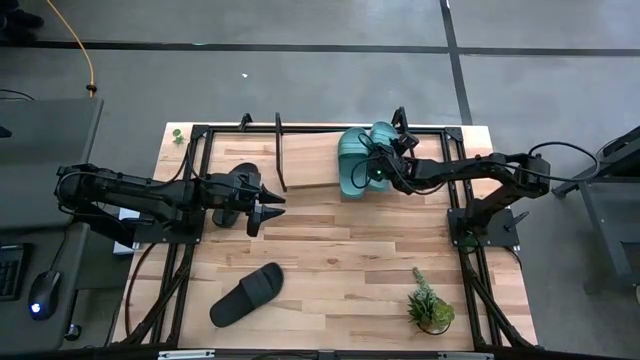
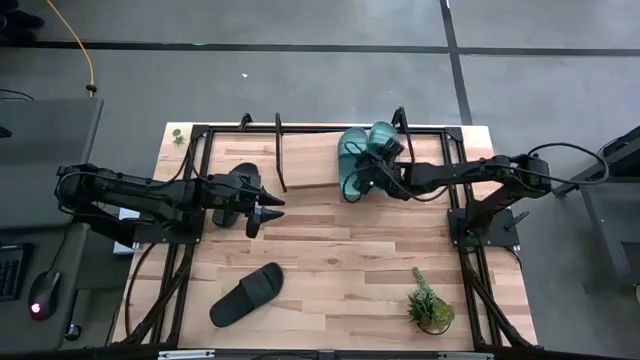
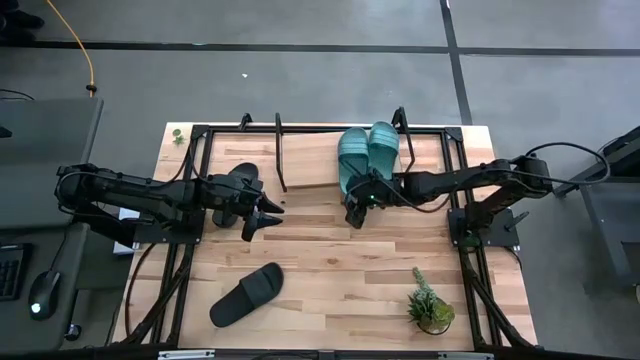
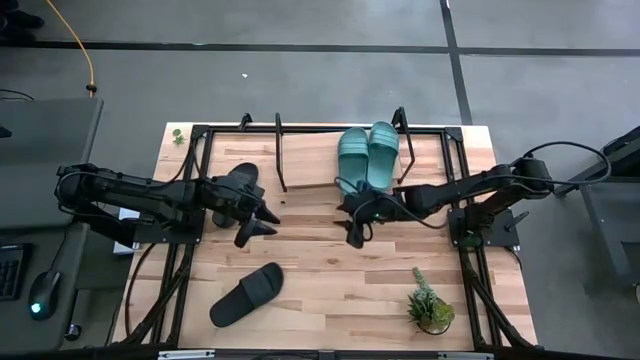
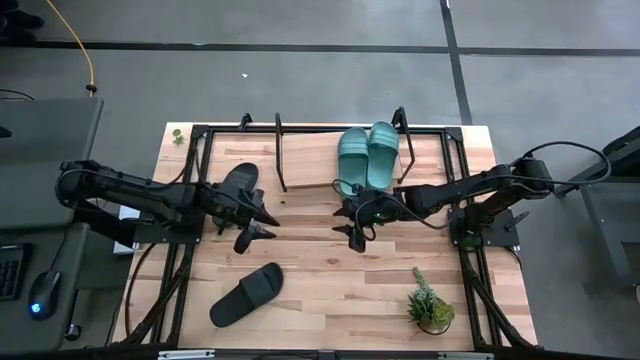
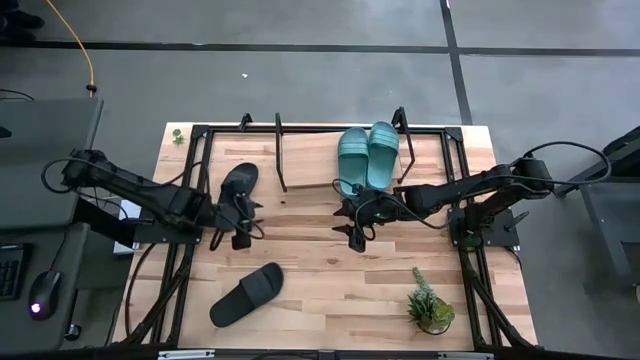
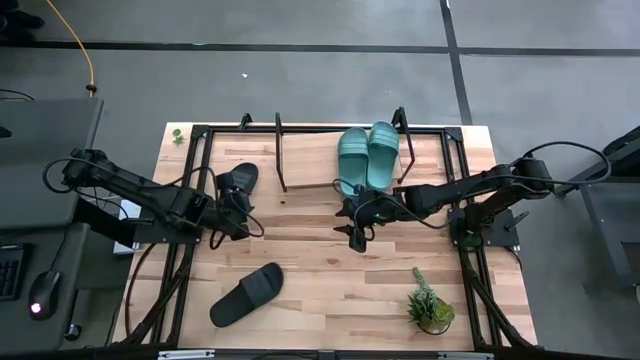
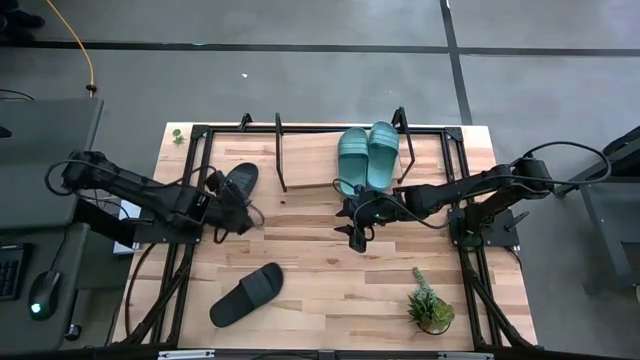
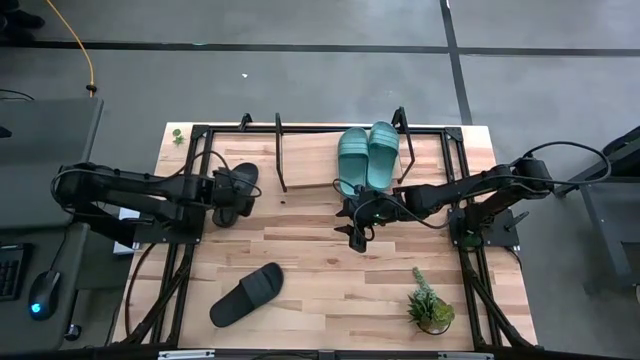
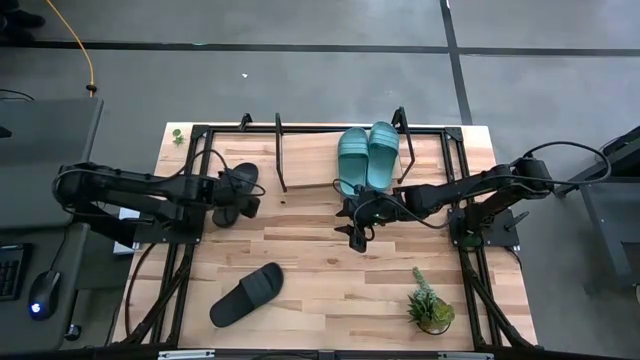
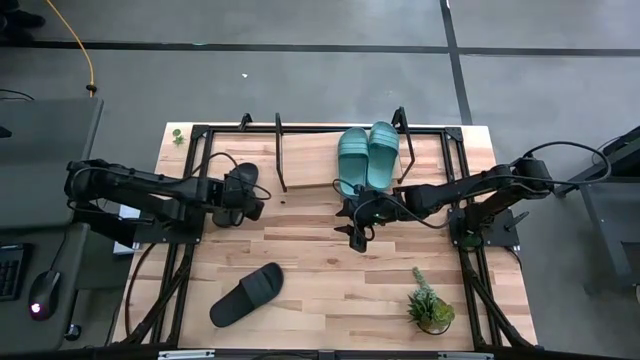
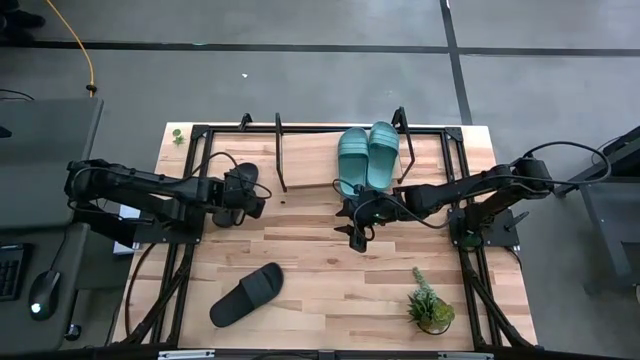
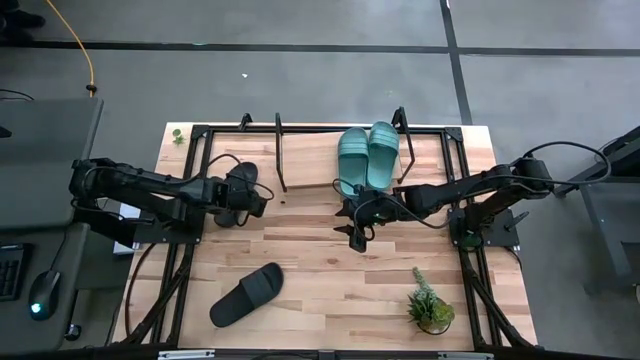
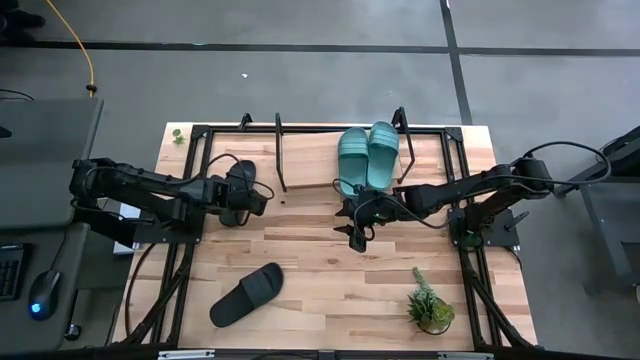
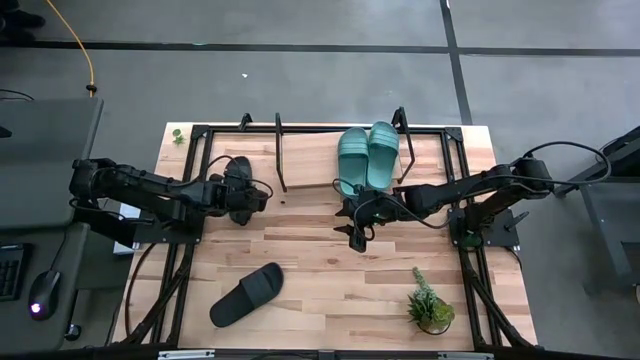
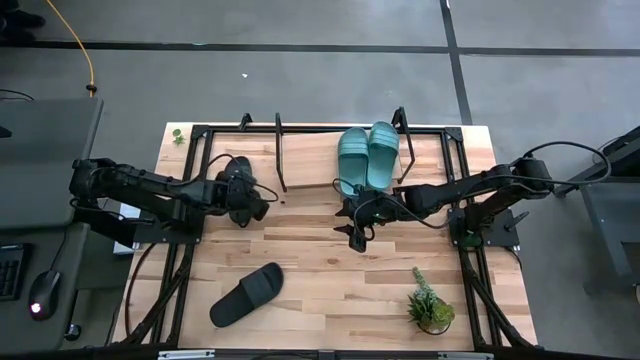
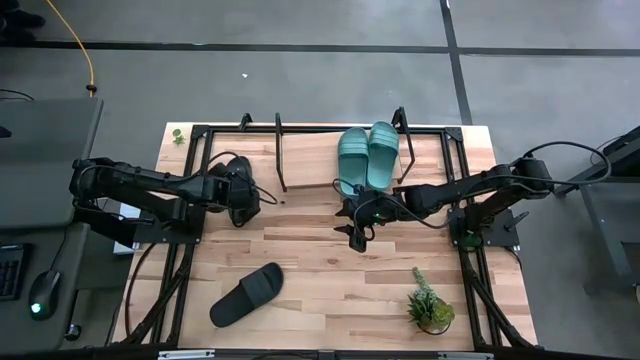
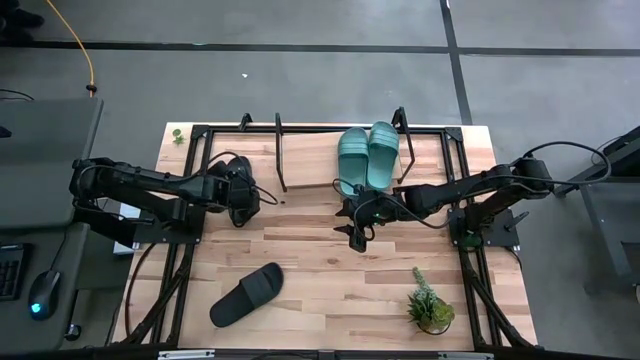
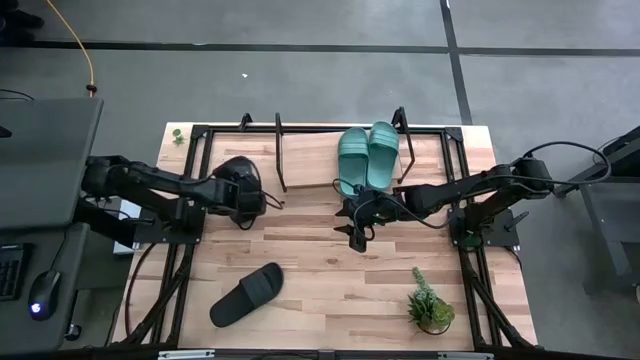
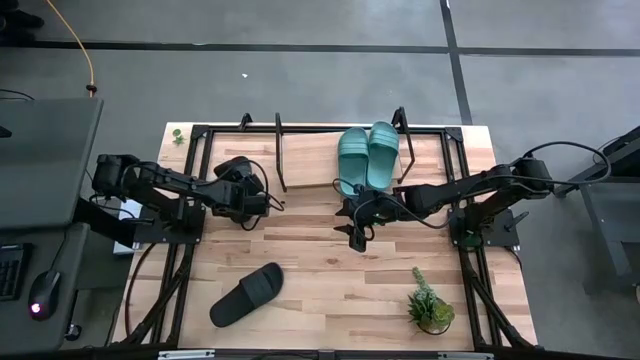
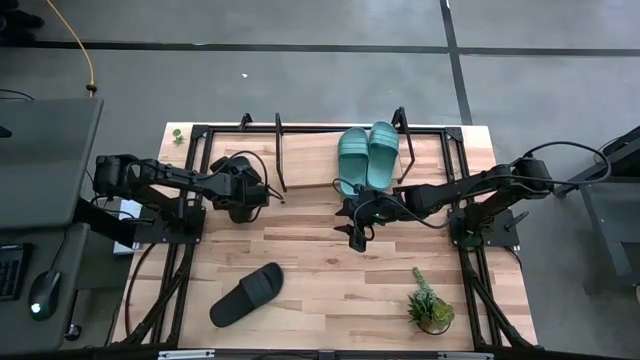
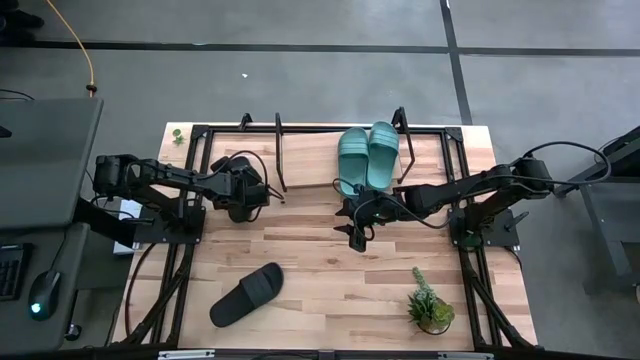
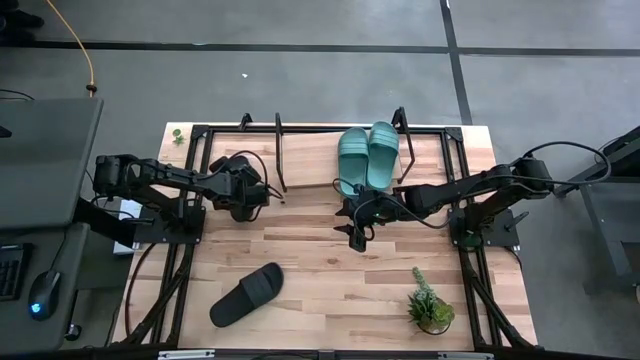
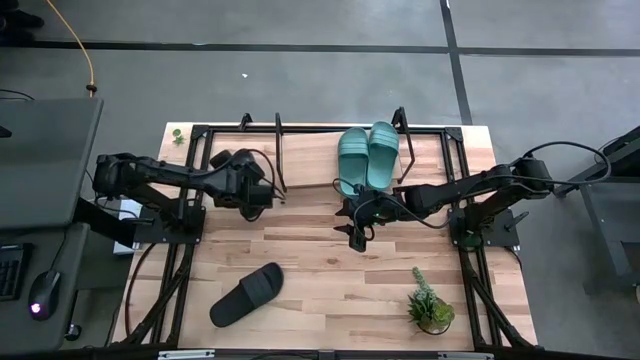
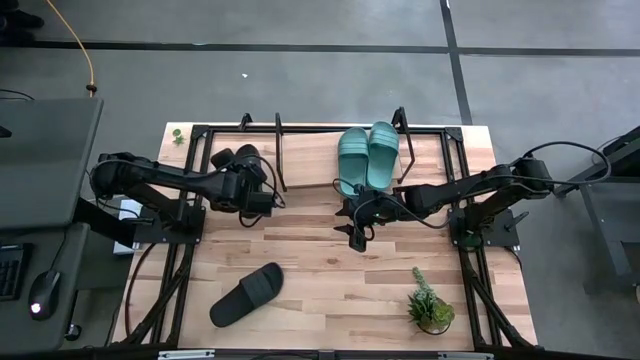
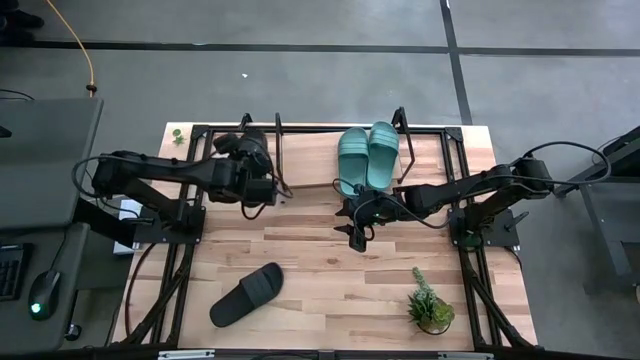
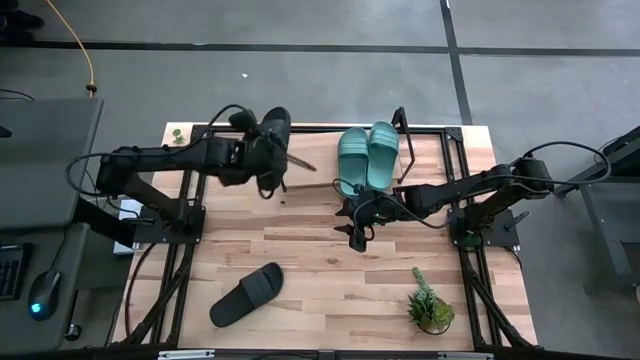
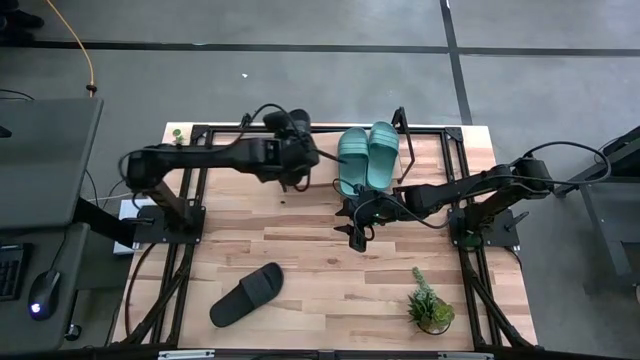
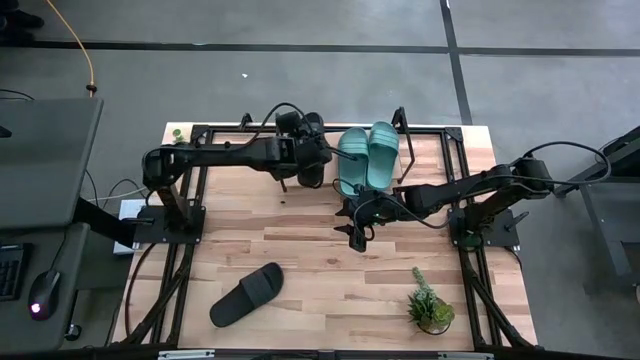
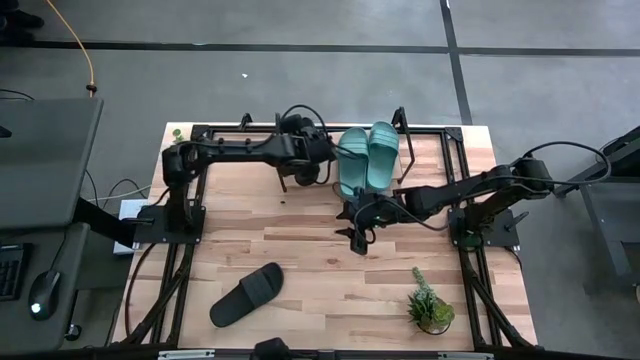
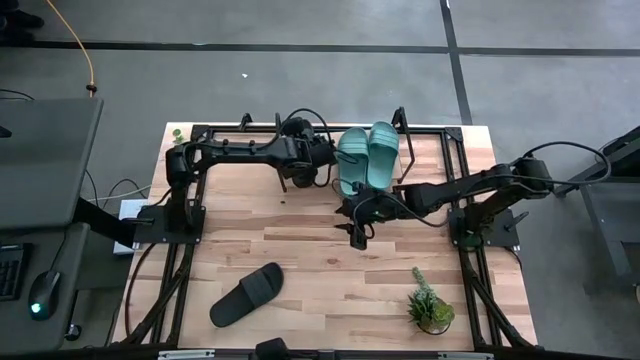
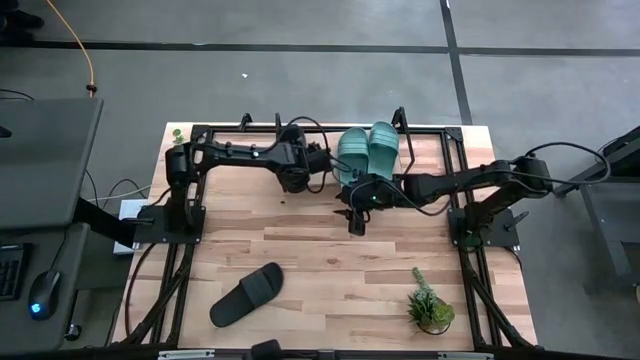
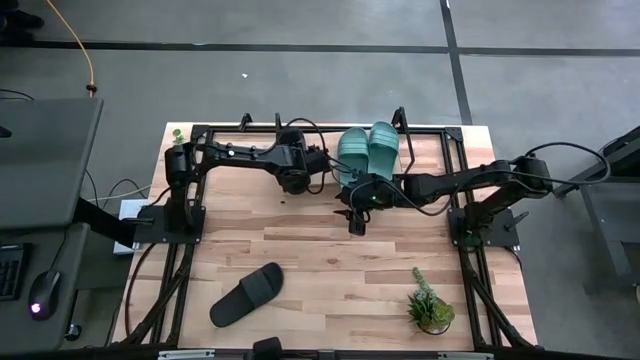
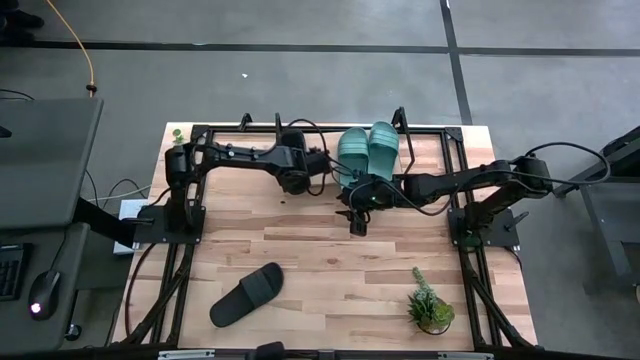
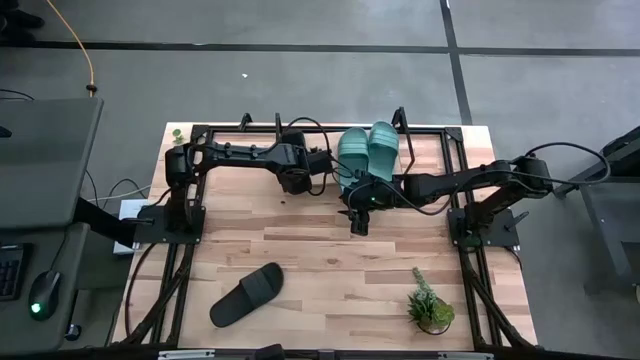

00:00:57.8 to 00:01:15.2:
Task: Pick and place slides into the shelf
Put the top black slipper on the shelf

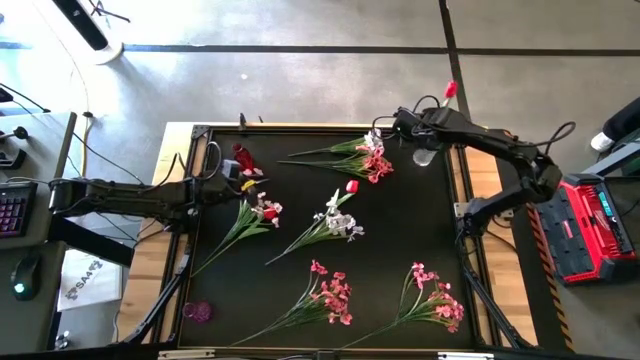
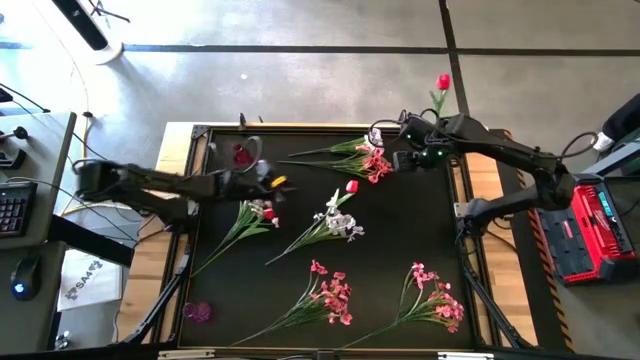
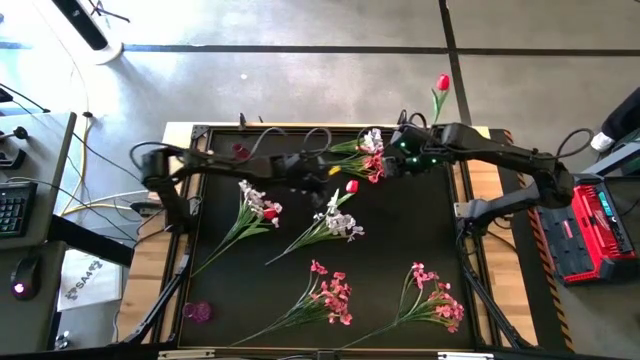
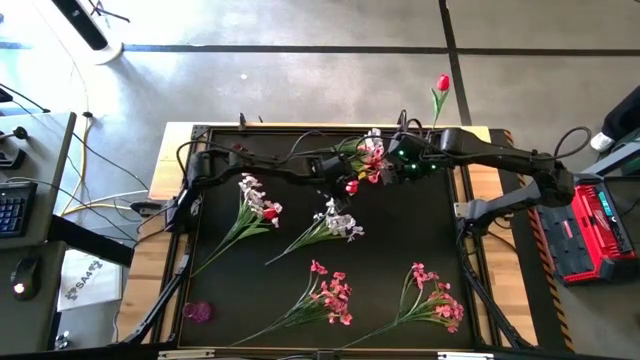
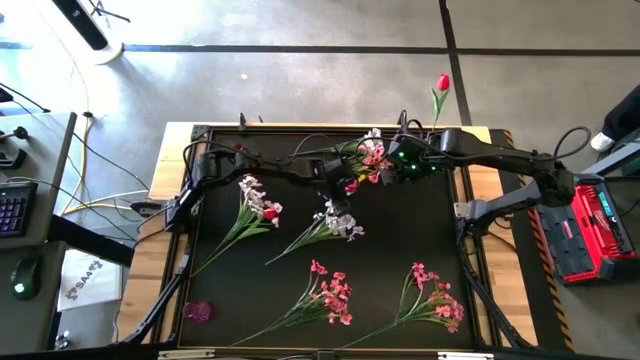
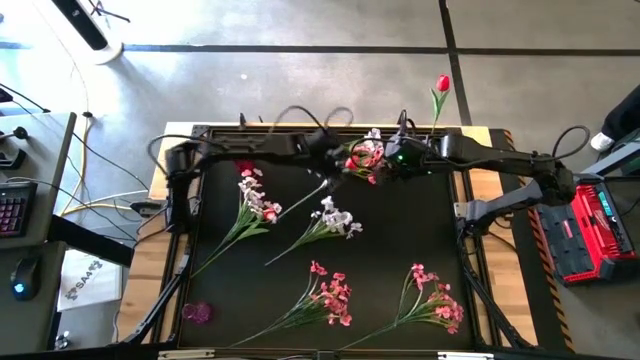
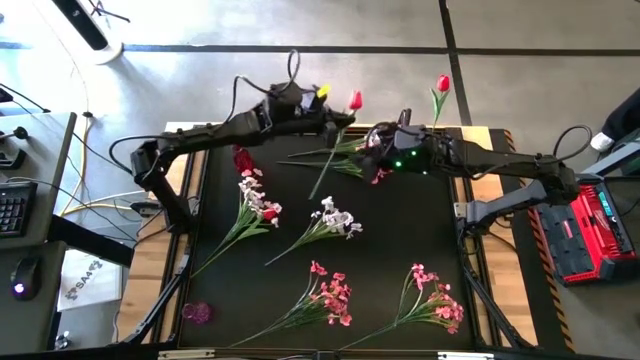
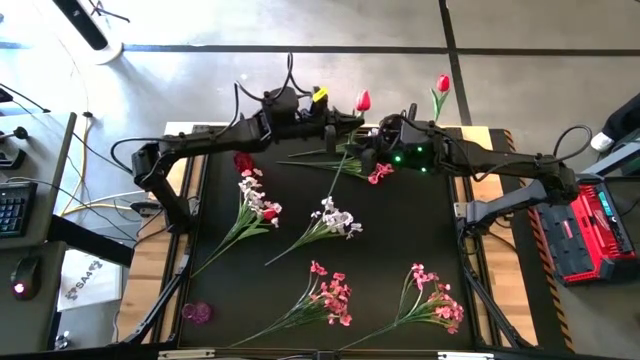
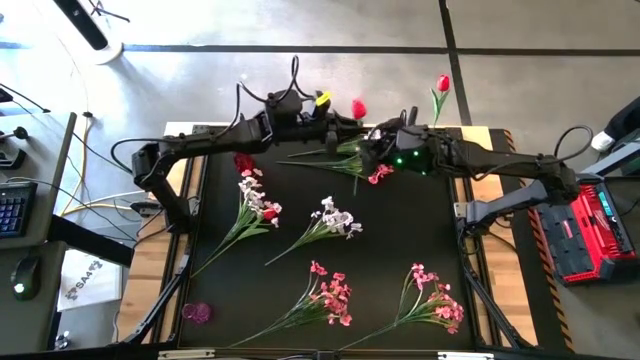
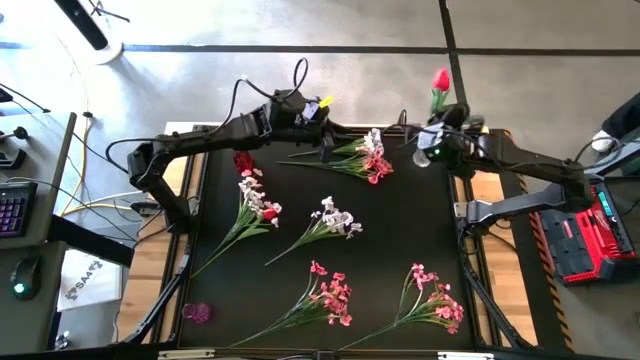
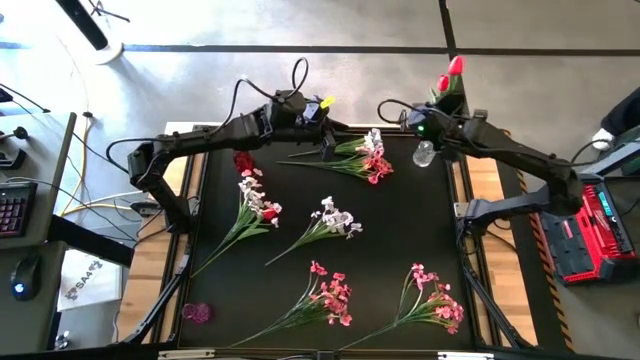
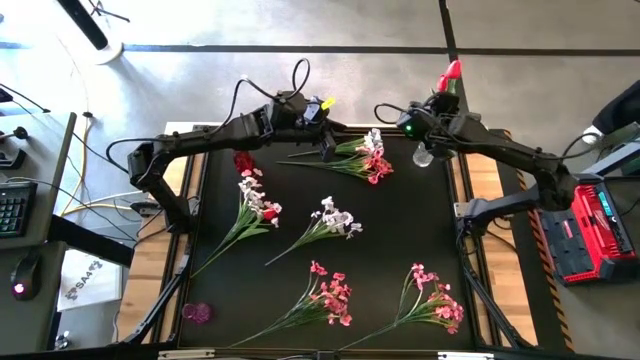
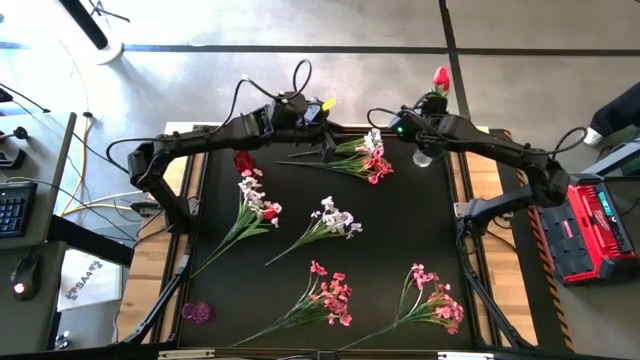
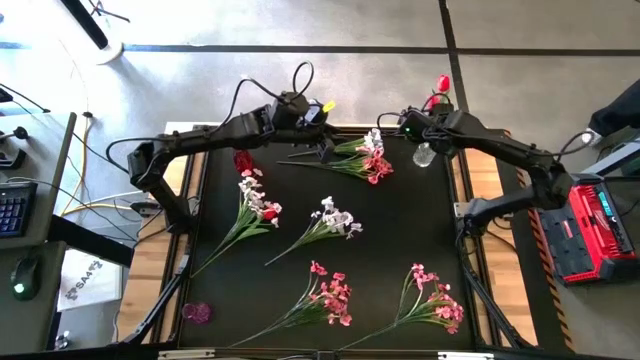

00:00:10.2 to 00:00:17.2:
Task: Sort flowers into vase by color
Put the right red tulip into the transparent vase
